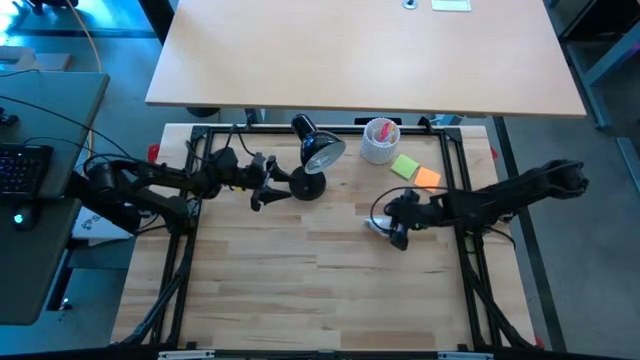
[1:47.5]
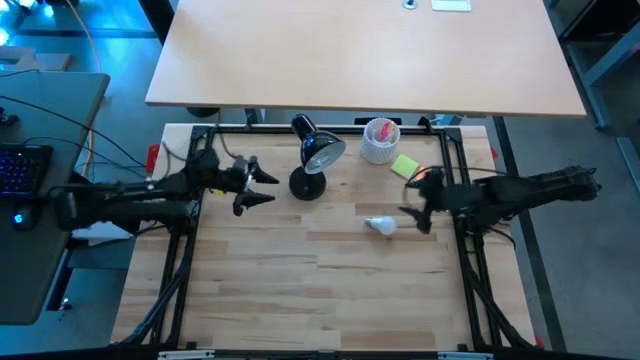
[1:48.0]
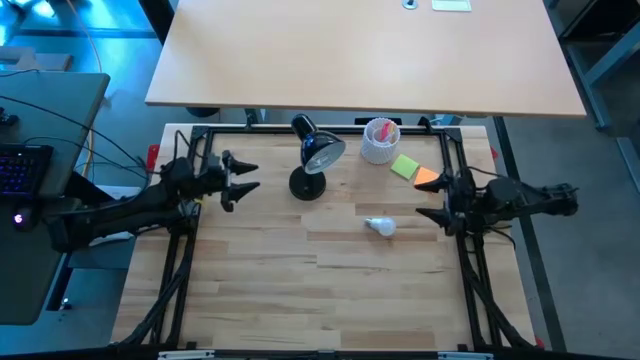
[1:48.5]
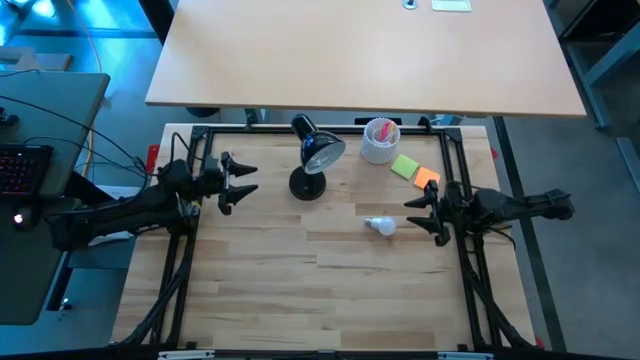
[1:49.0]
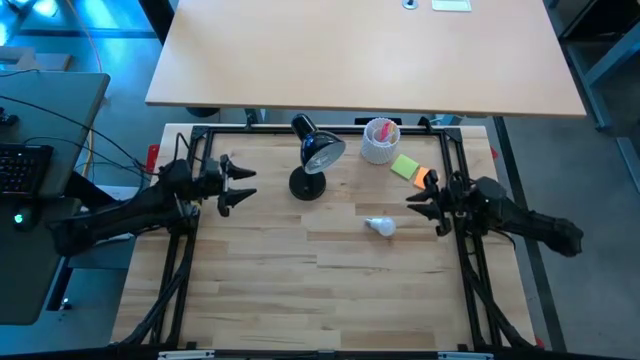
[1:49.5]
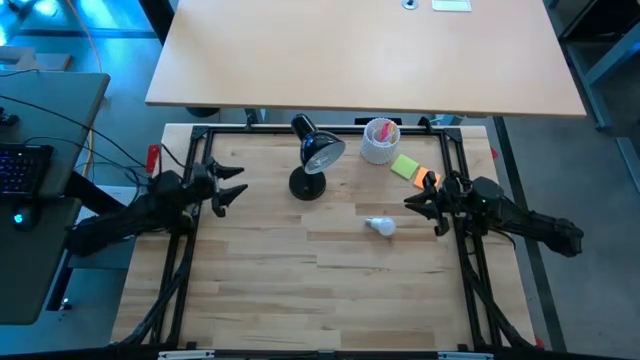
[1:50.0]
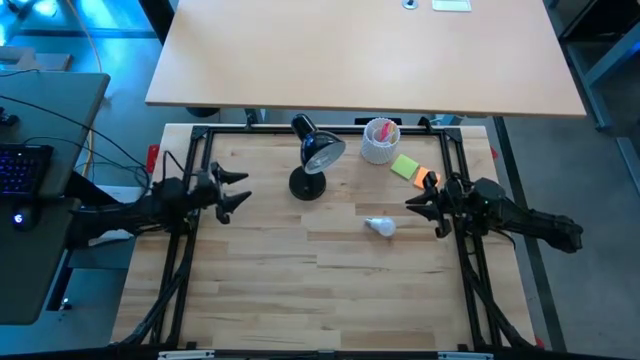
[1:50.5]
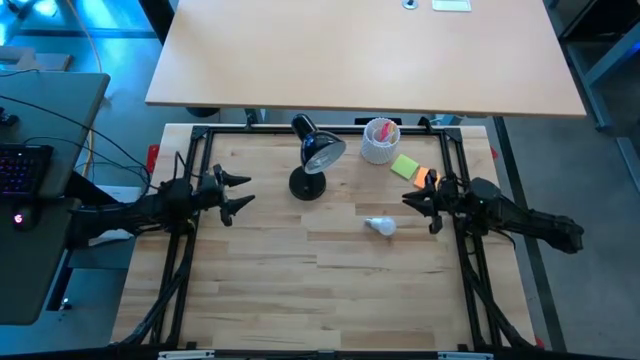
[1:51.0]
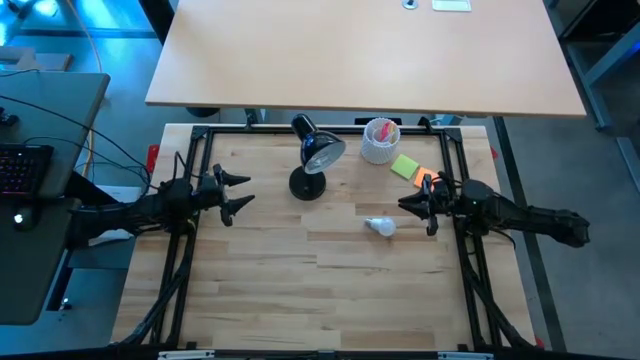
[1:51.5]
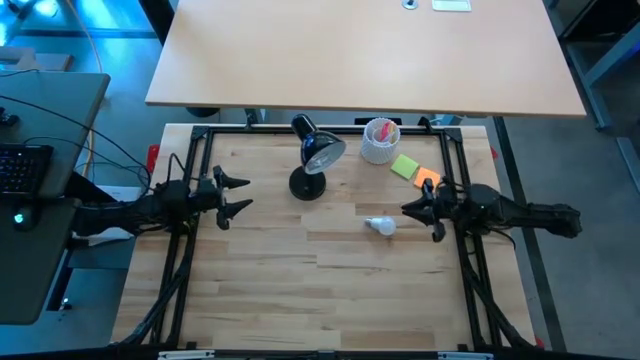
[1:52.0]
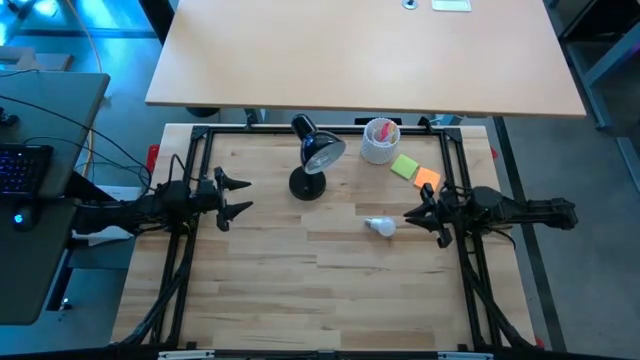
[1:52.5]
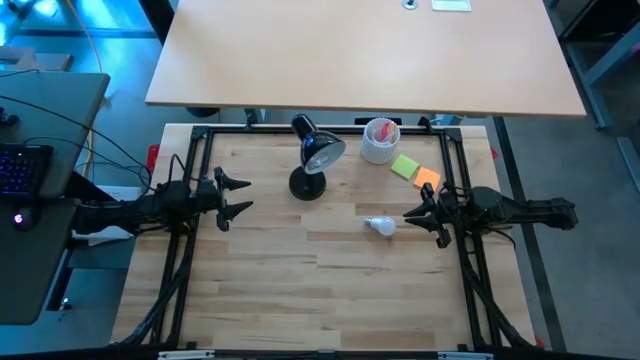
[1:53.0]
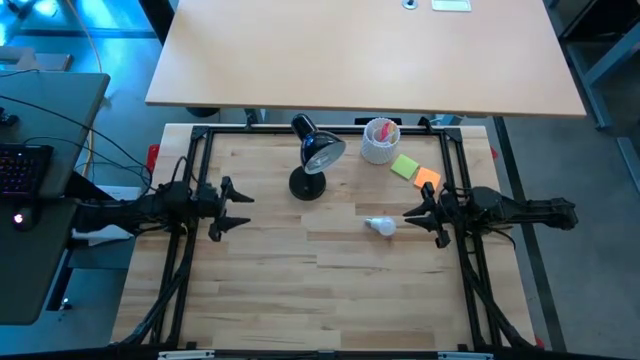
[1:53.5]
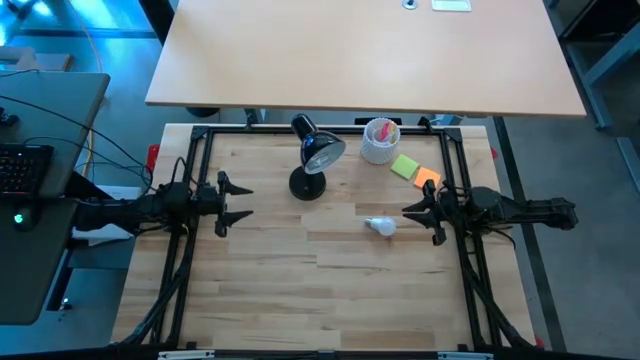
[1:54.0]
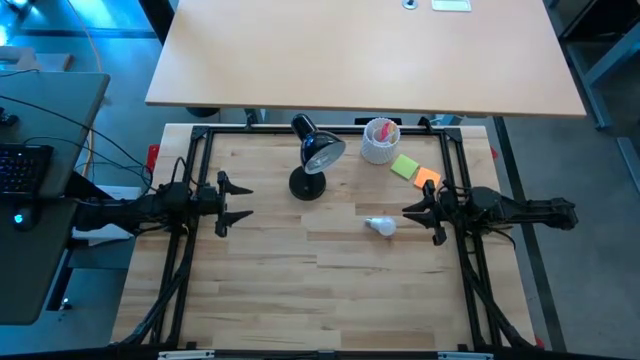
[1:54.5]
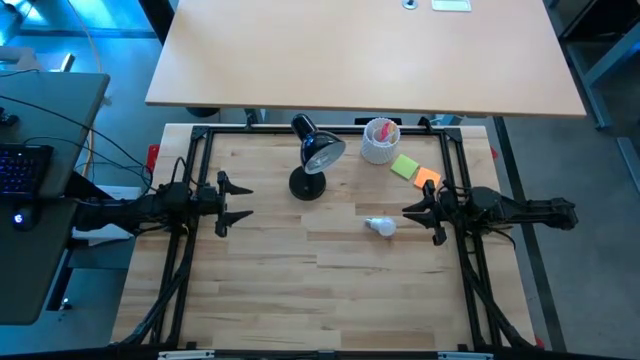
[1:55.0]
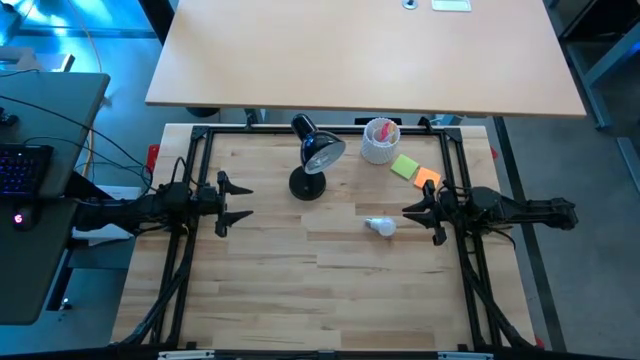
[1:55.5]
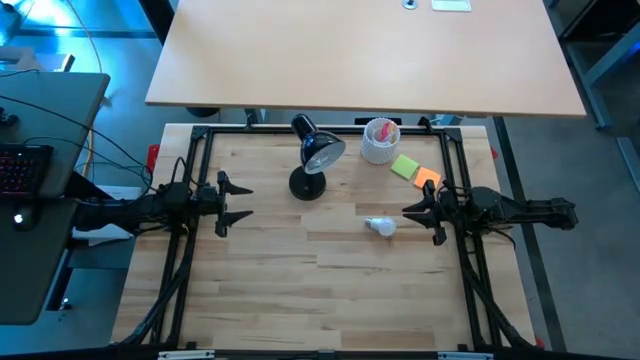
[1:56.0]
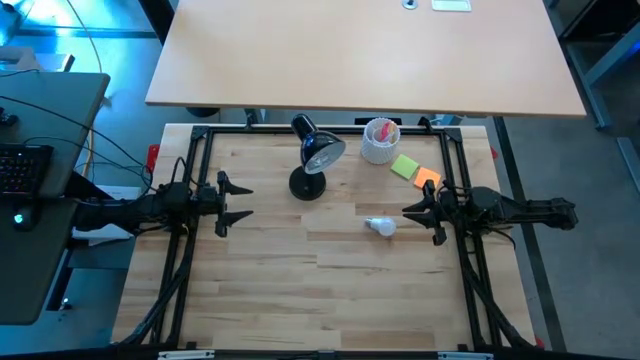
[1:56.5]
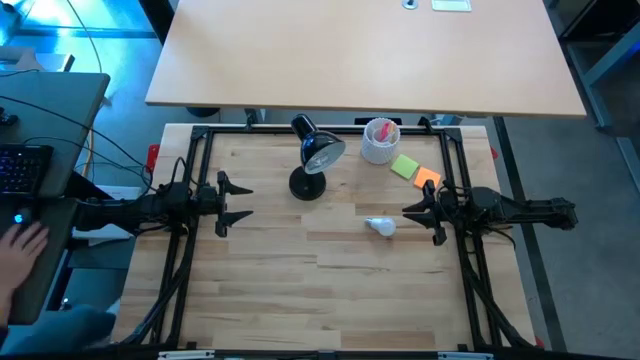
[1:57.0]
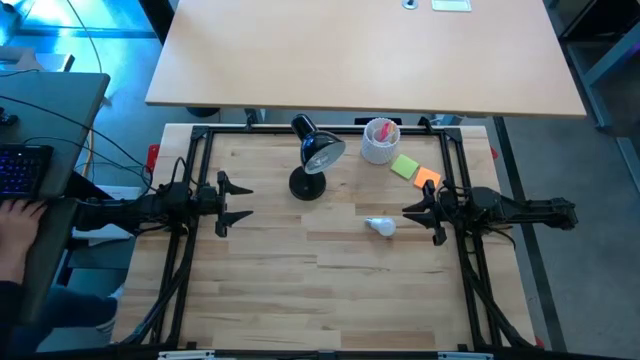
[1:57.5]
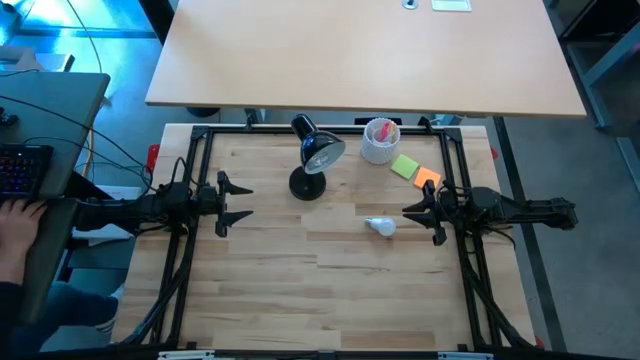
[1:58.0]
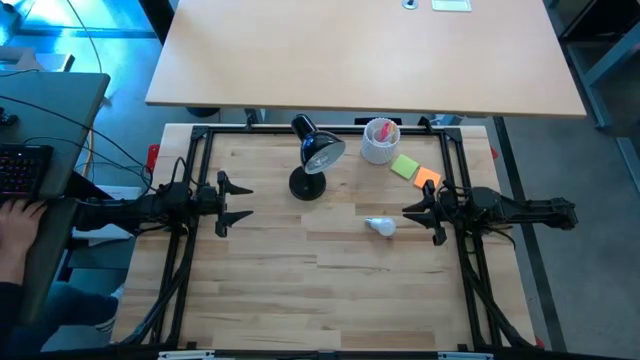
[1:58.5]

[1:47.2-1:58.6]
Task: Screw lightbulb
Return to Home Position

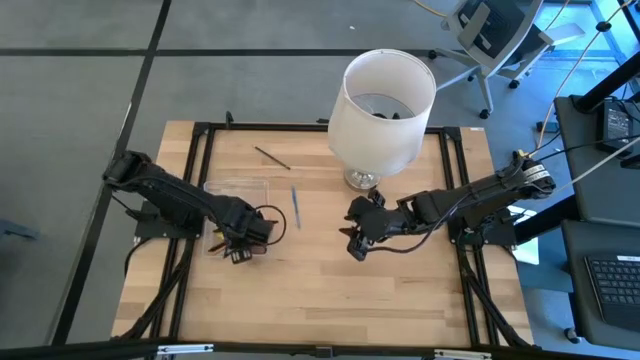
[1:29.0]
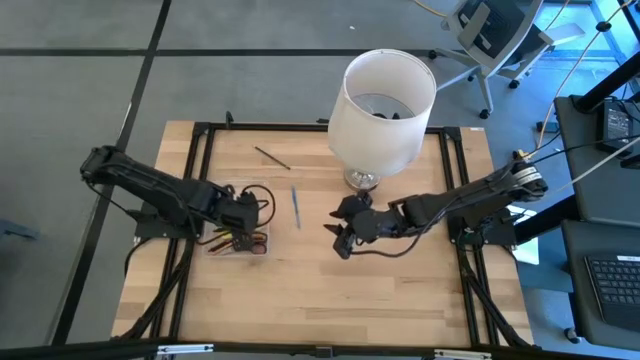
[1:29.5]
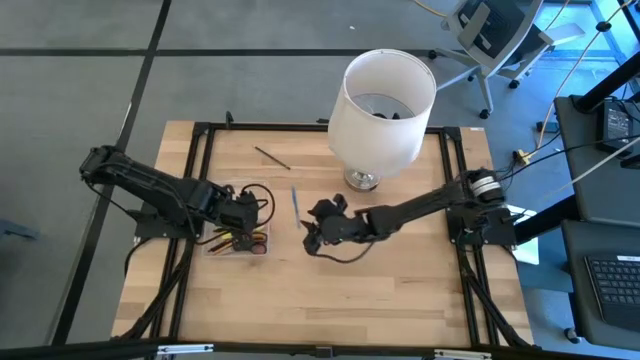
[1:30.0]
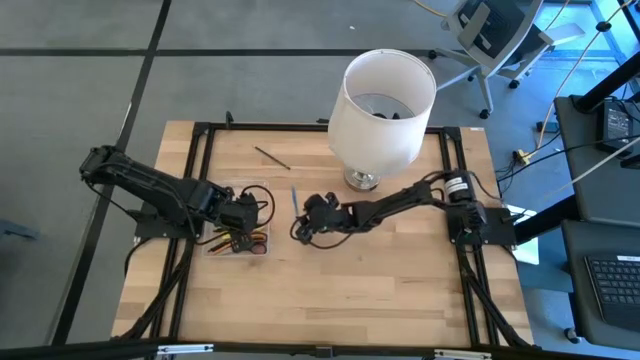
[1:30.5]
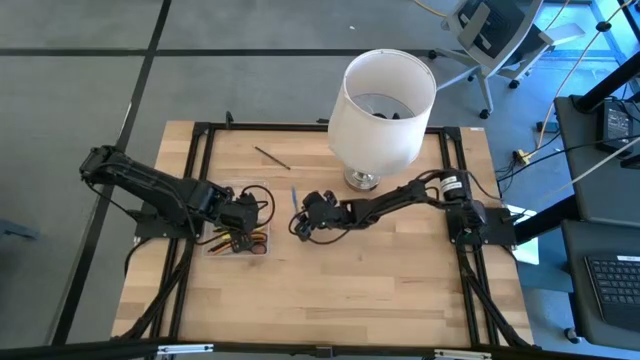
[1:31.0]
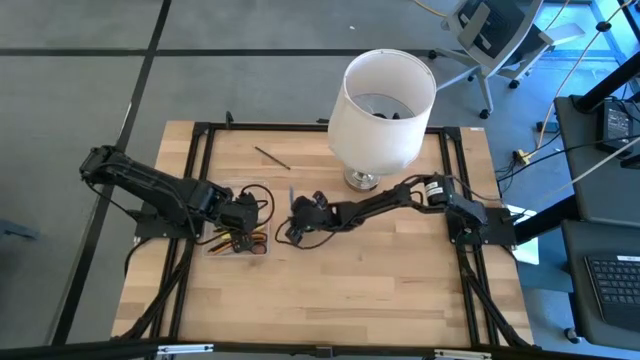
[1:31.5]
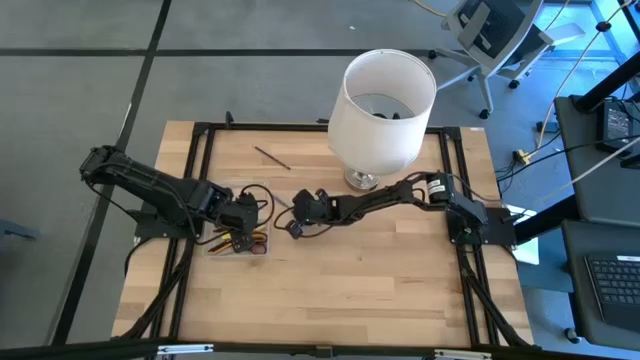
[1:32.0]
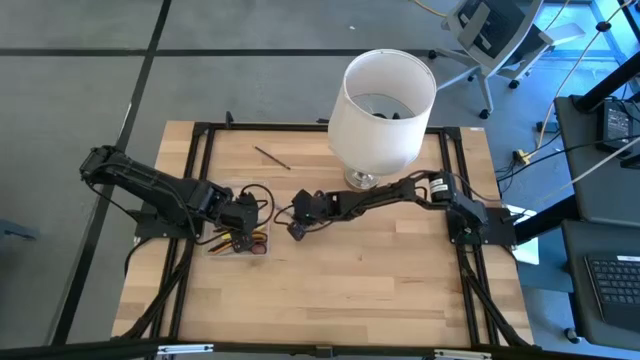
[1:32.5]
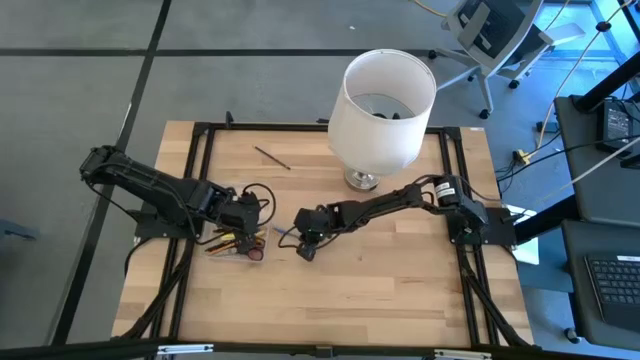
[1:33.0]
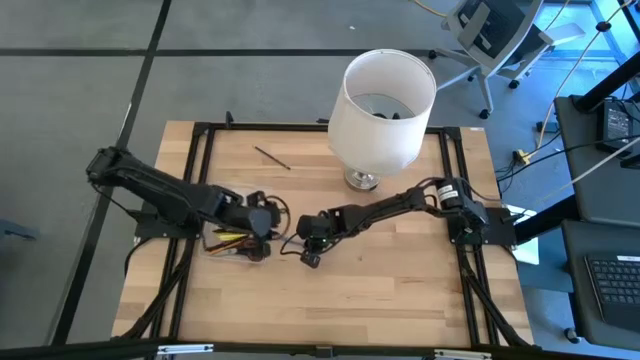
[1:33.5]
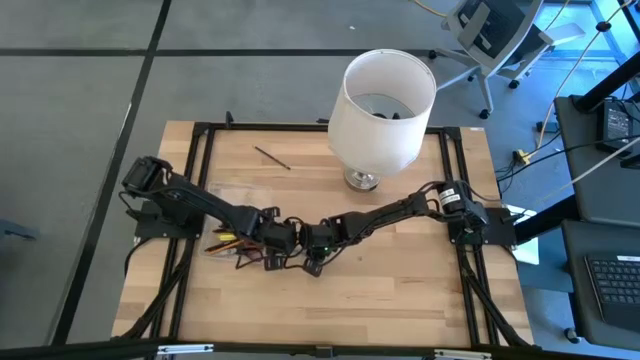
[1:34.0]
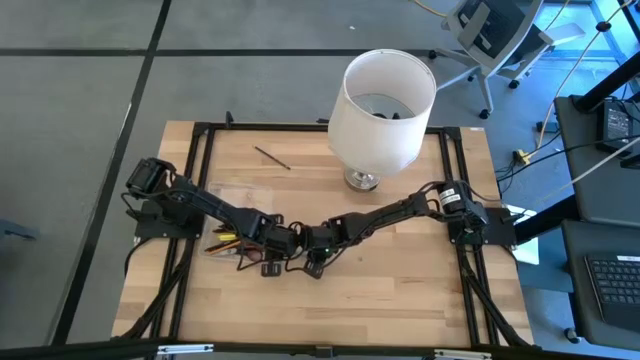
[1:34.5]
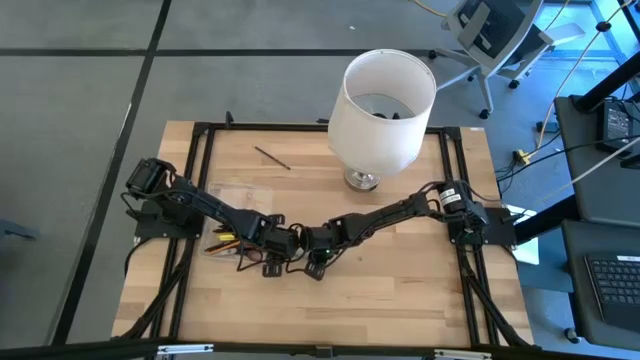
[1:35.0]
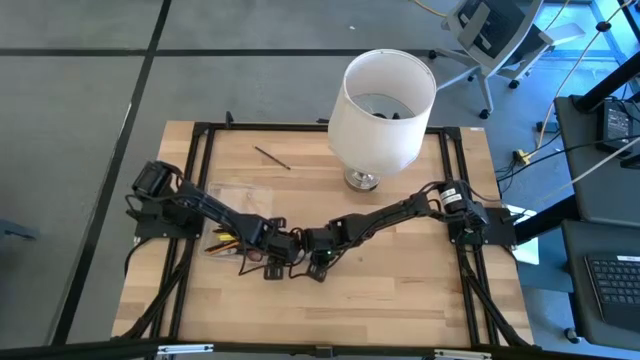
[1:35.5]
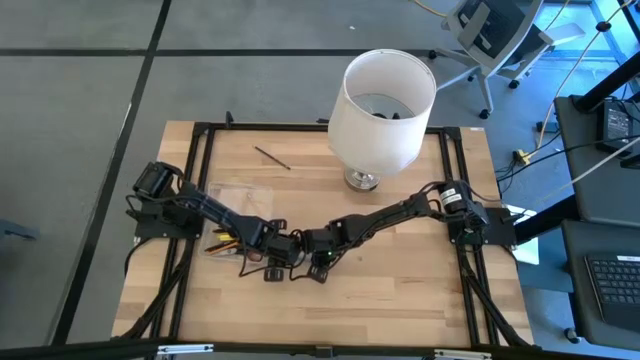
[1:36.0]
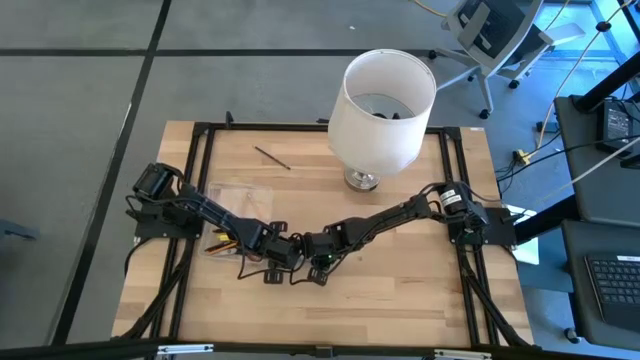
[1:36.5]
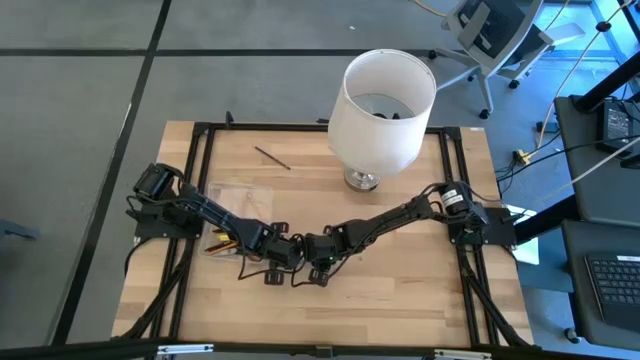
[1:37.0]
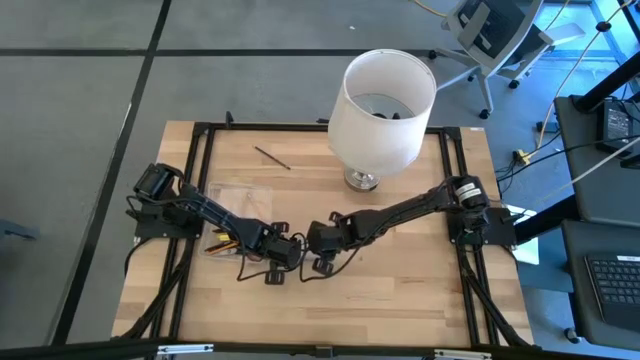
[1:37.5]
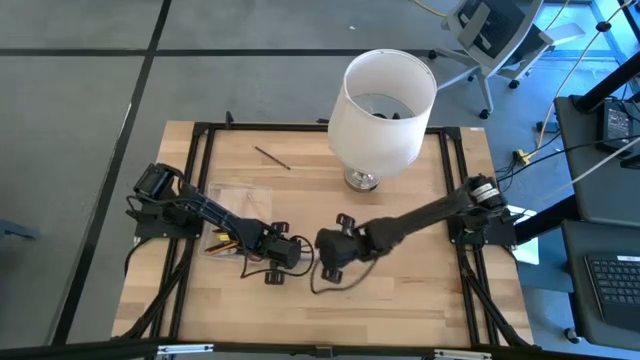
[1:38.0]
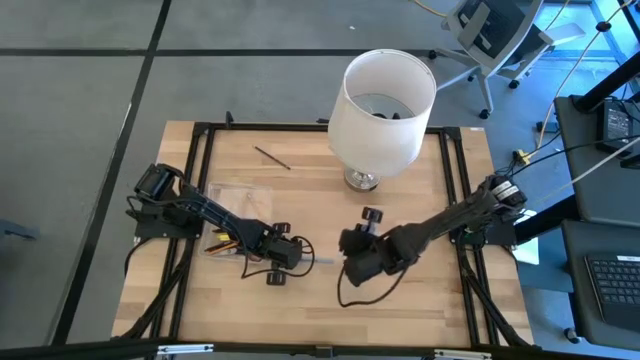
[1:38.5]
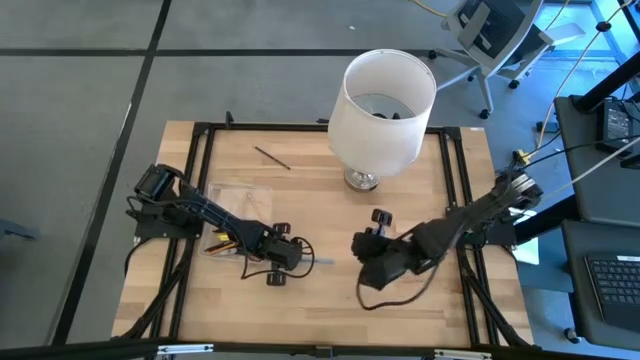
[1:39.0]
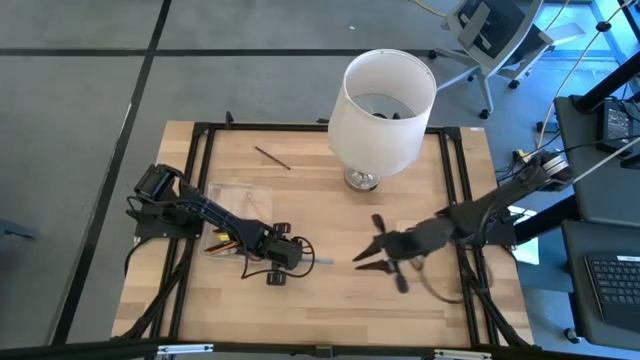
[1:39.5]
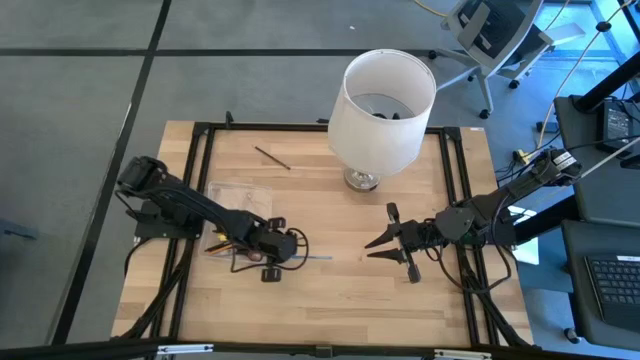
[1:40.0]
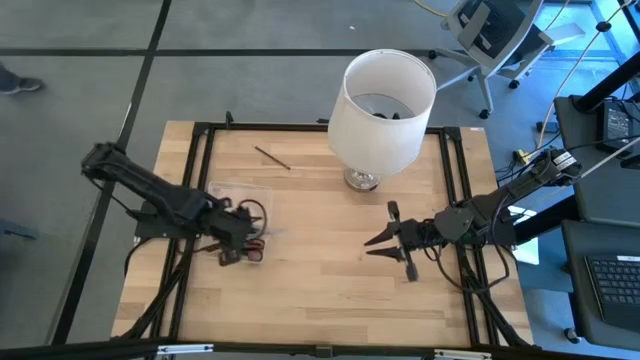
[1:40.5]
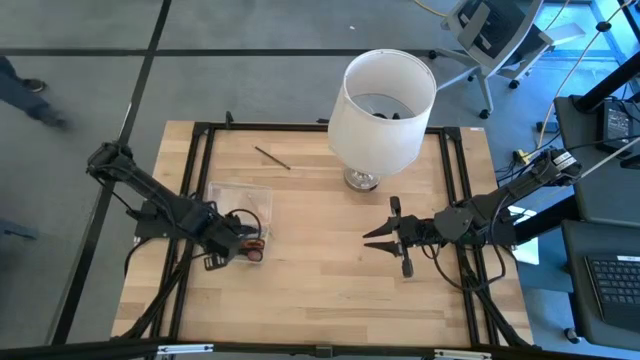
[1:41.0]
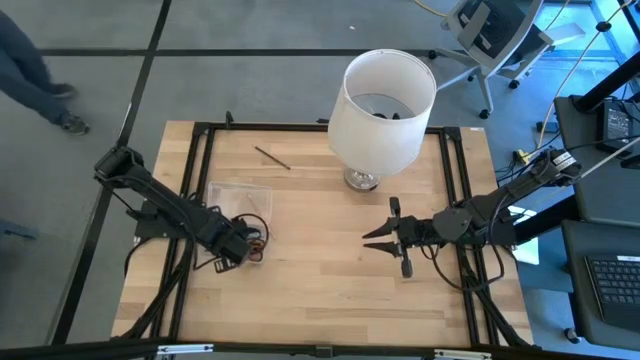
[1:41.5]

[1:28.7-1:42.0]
Task: Pick & place school supplies into a supply box
Put the blue pen into the transparent supply box
